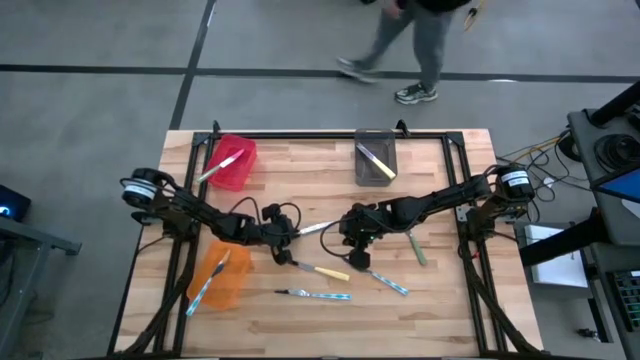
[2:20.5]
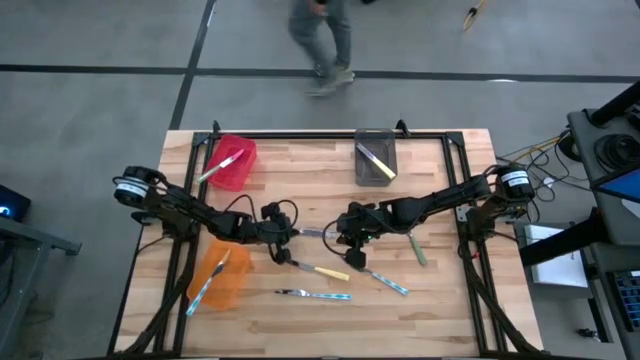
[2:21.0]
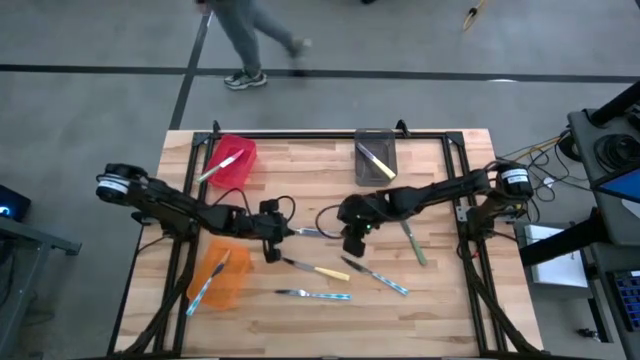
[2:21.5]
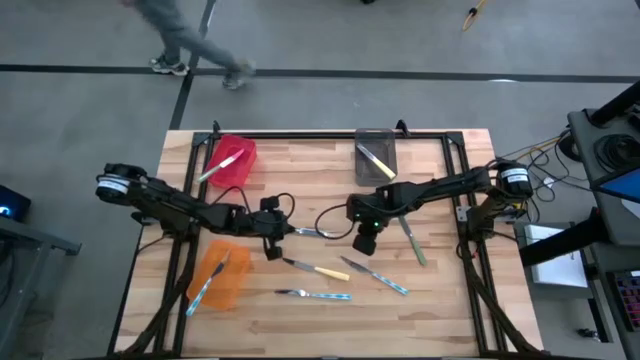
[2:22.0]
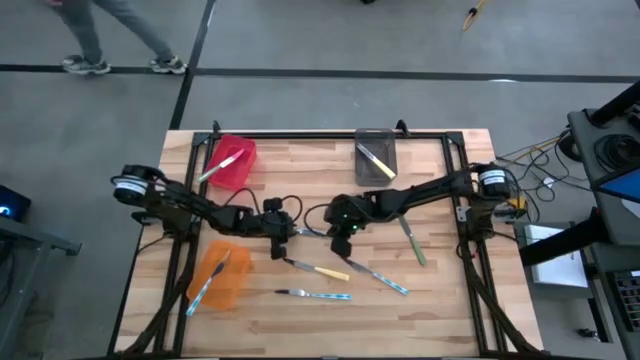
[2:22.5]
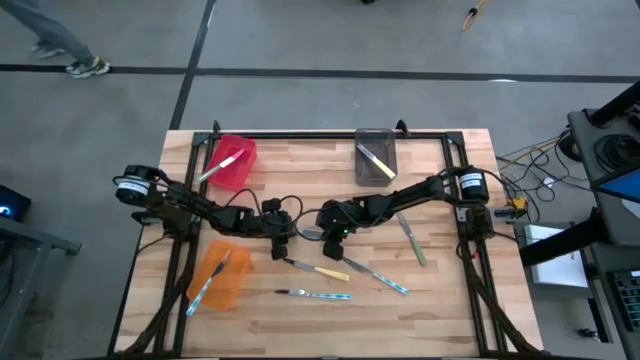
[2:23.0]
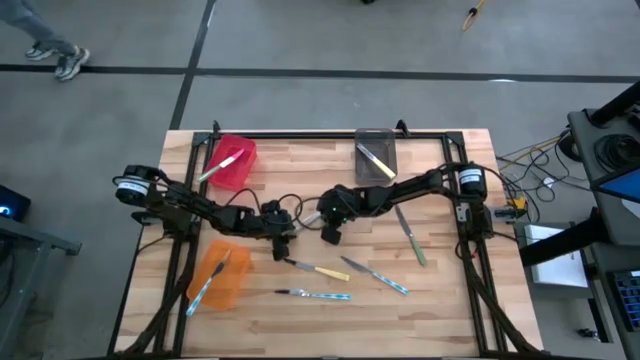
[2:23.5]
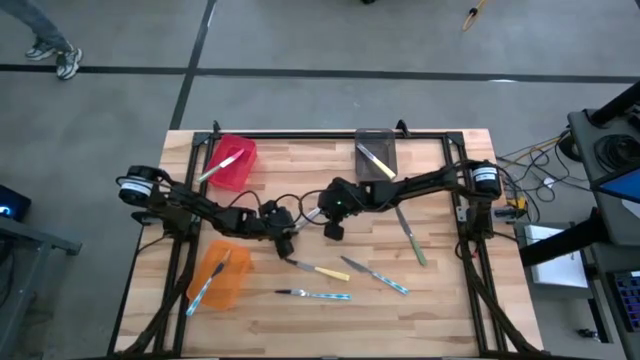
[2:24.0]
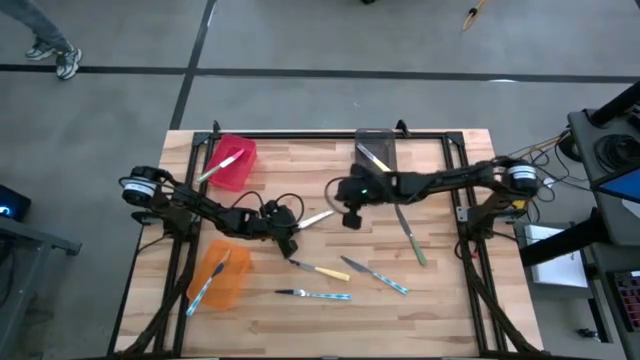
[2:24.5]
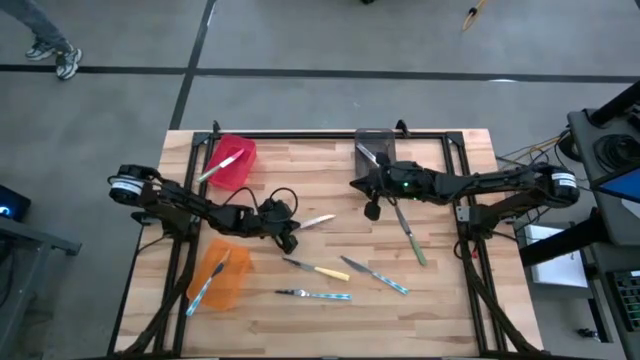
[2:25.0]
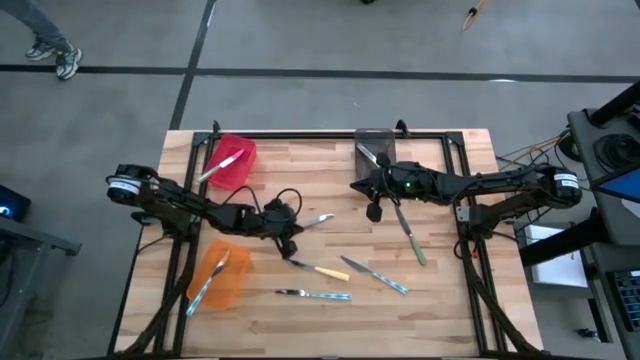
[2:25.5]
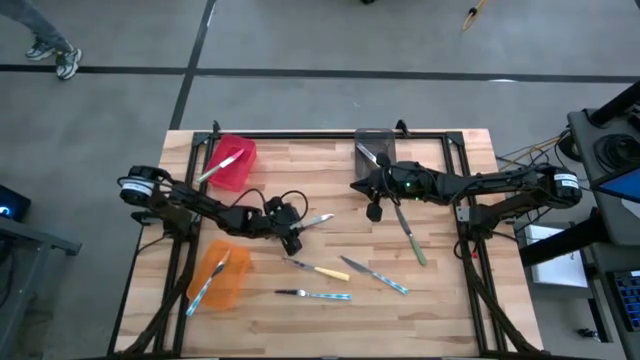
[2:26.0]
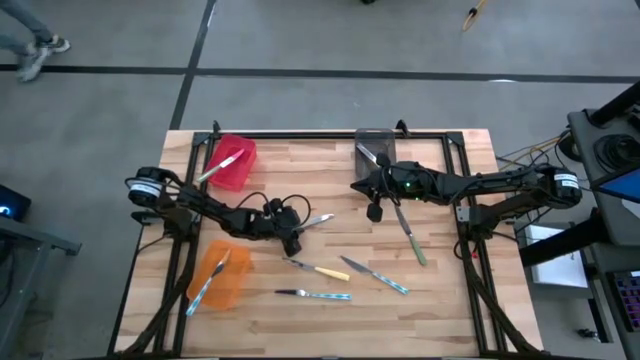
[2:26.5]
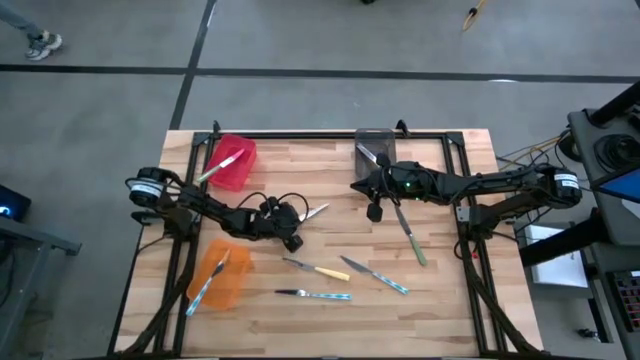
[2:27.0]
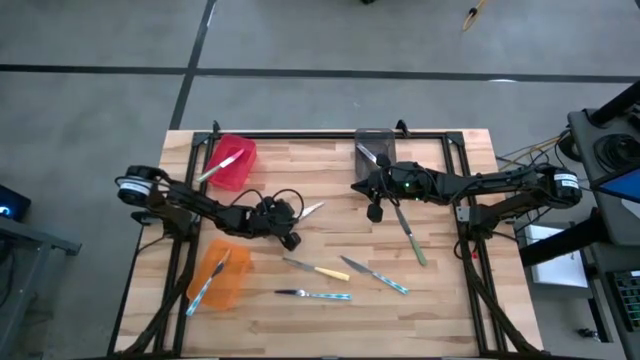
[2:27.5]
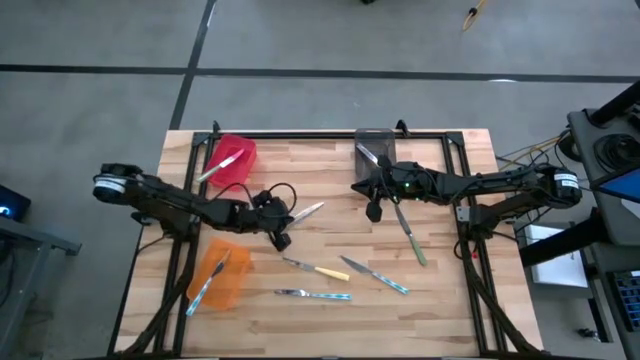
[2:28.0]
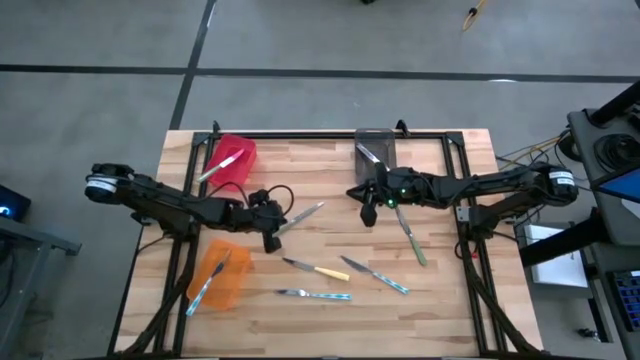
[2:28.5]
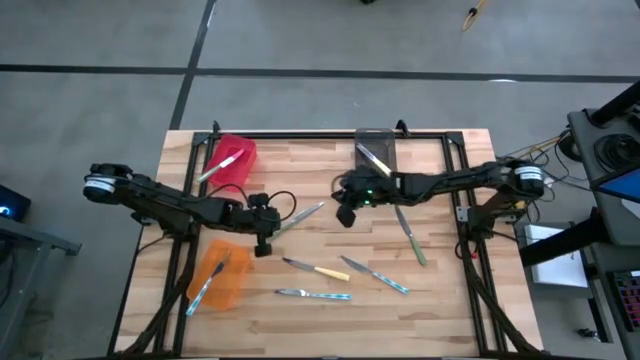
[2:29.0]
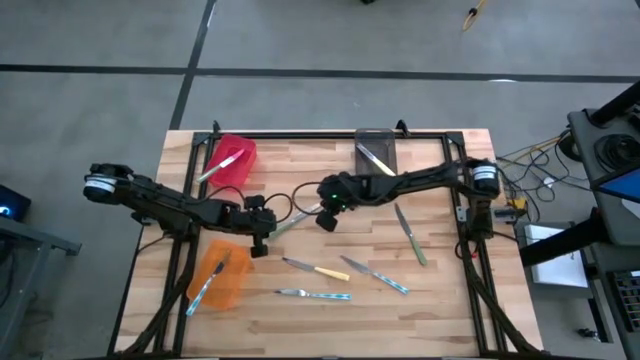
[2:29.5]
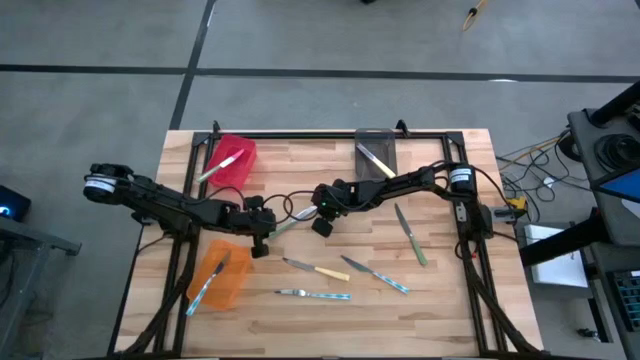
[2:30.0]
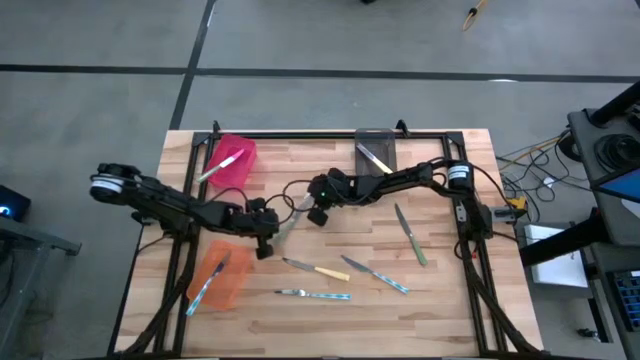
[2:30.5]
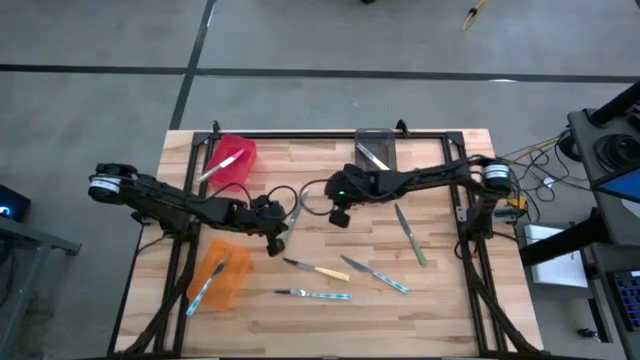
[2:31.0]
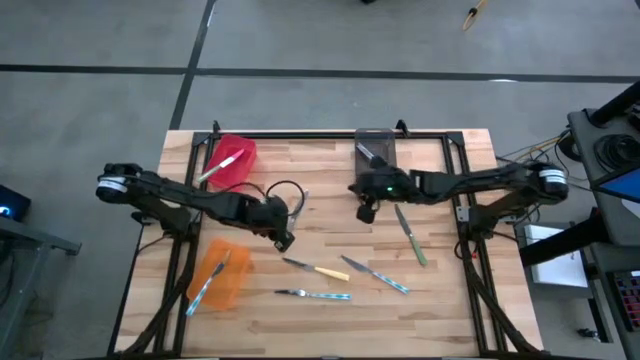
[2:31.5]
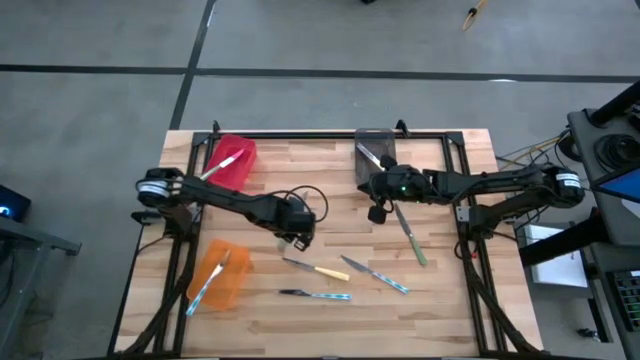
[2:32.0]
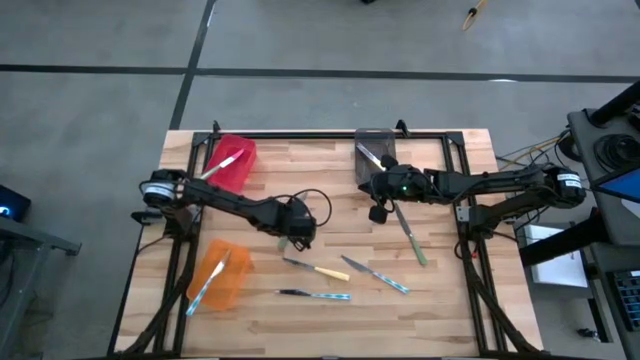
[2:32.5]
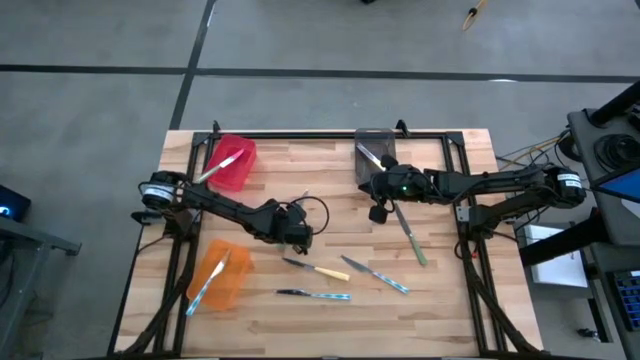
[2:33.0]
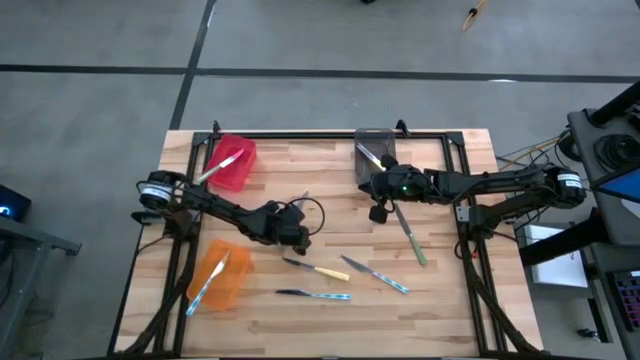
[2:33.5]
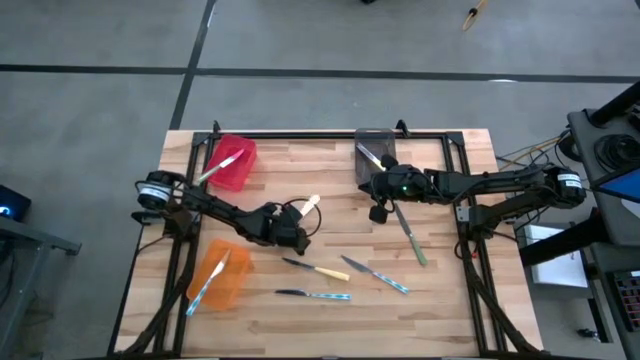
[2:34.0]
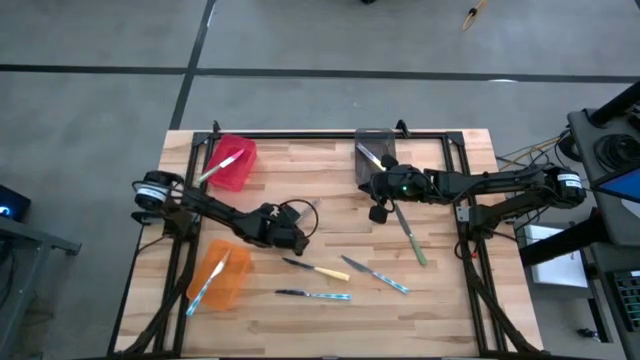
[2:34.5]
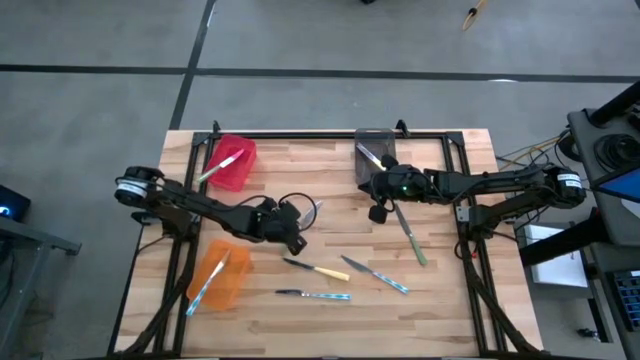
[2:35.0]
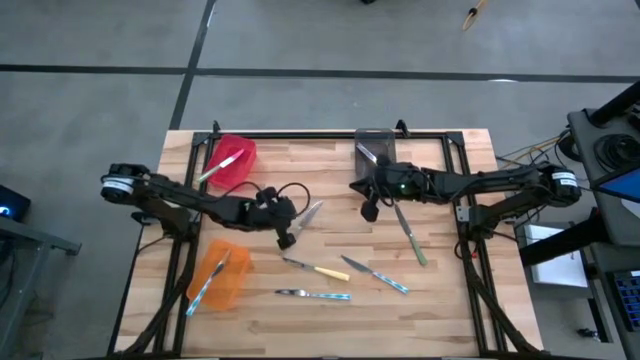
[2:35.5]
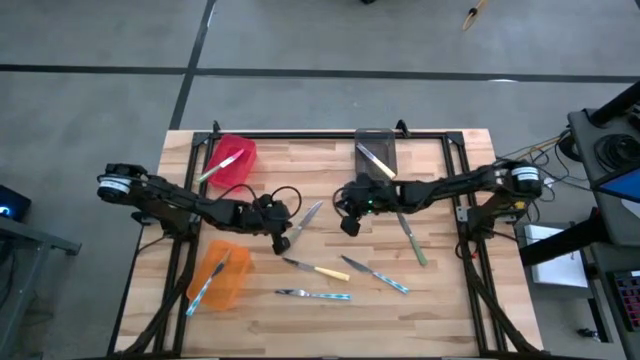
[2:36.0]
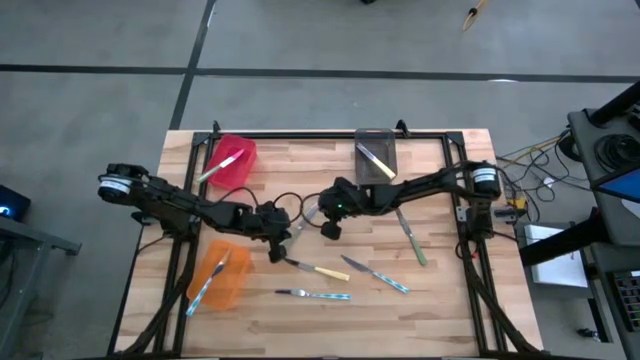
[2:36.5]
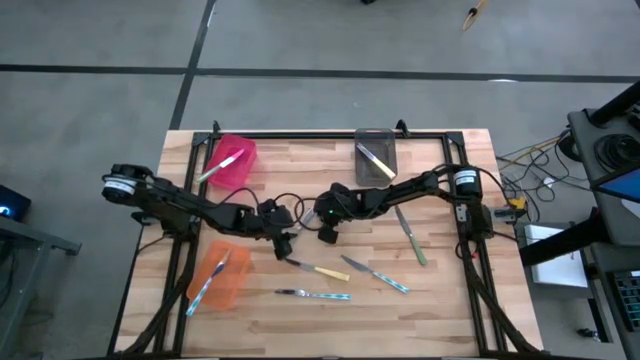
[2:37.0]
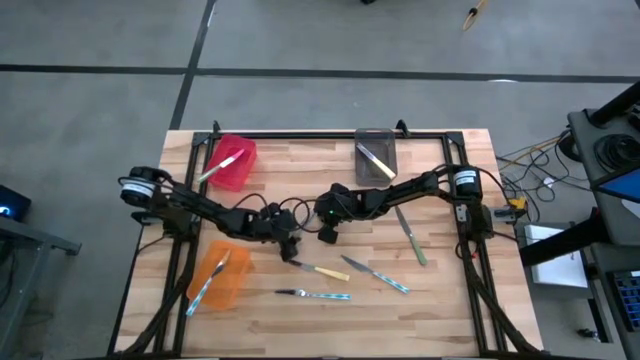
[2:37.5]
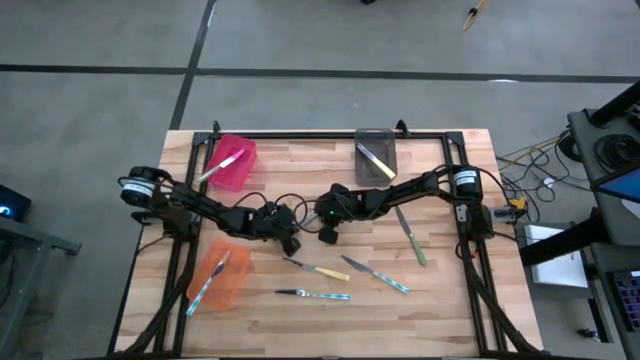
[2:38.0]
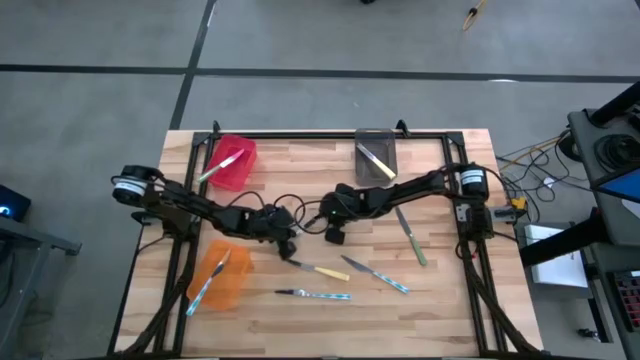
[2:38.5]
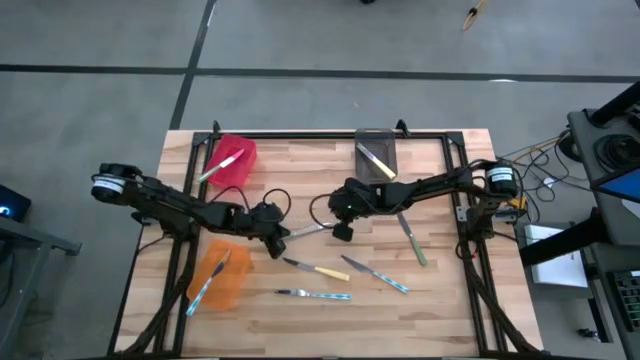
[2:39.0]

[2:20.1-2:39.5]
Task: Sort silverware by color (type)
Put the left green knife into the red bin

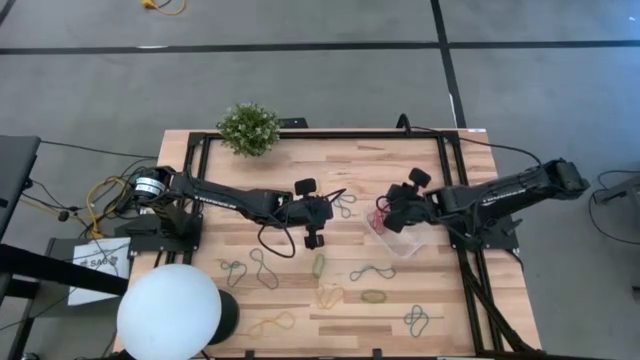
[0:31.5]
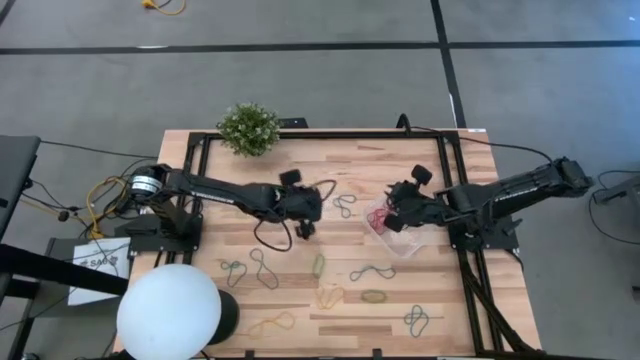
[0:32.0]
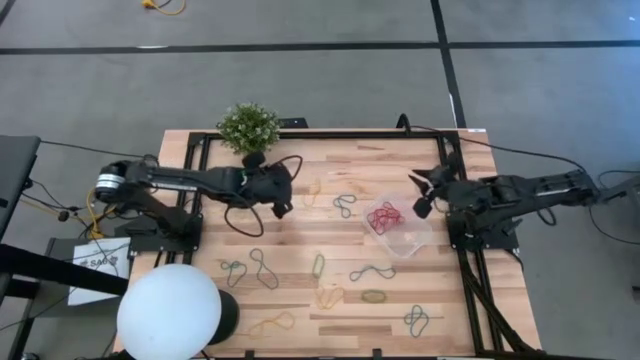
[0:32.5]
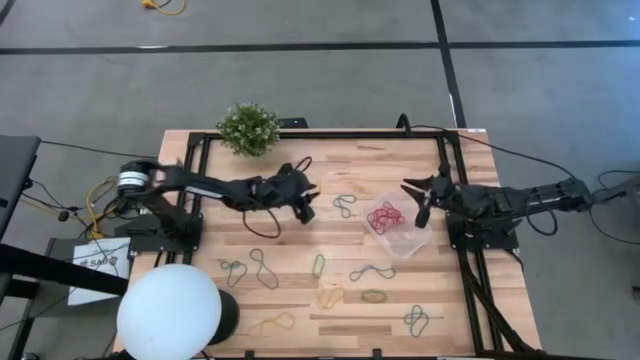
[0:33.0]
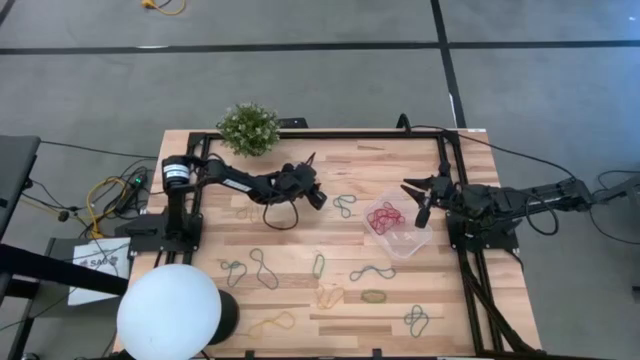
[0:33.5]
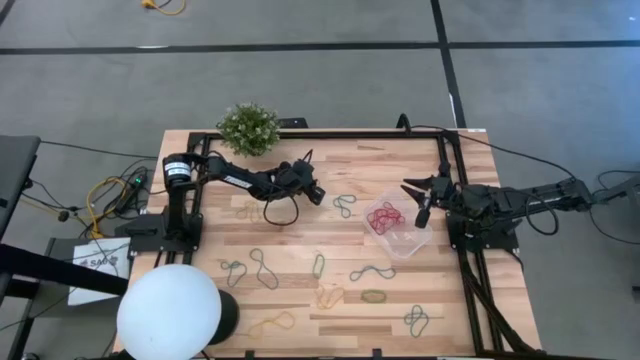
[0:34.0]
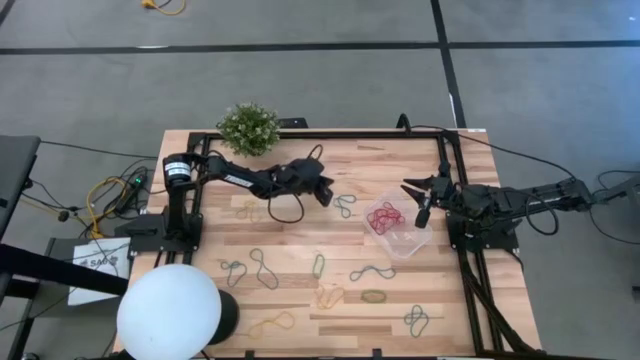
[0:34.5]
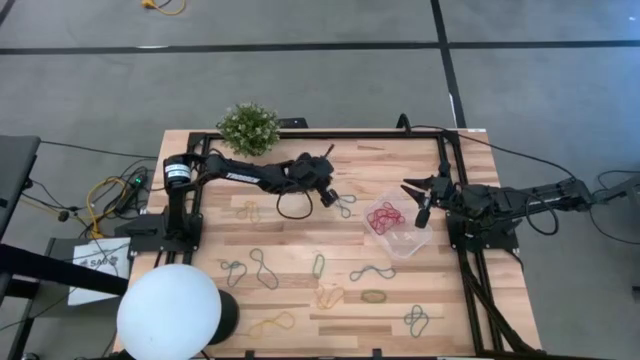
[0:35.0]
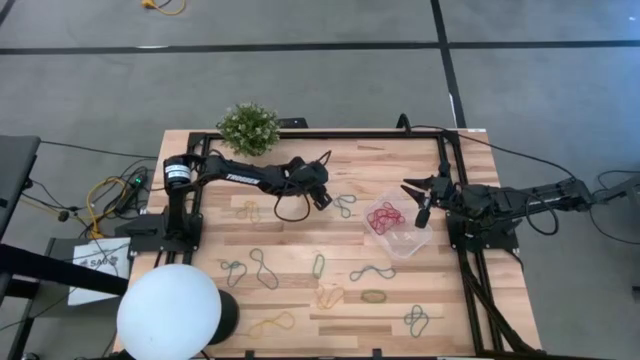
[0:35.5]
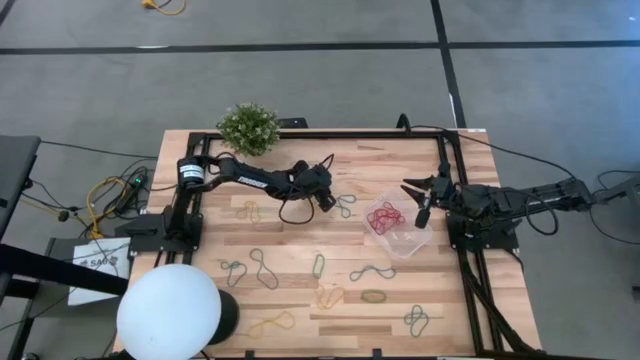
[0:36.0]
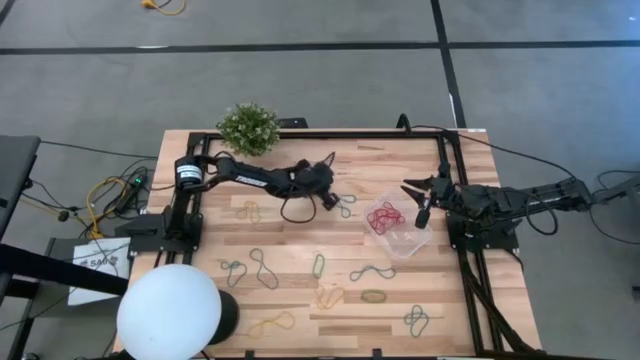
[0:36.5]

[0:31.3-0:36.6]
Task: Pick and place items into bin
Put the yellow rubber band into the transparent bin
